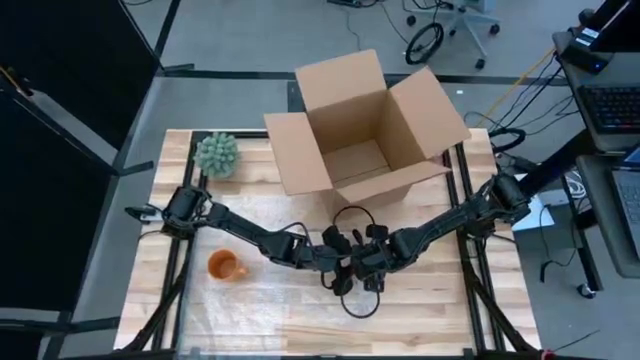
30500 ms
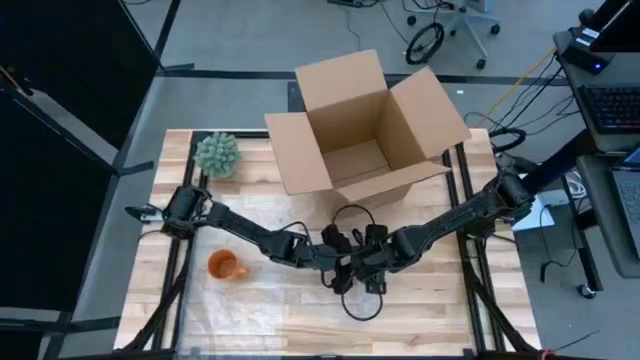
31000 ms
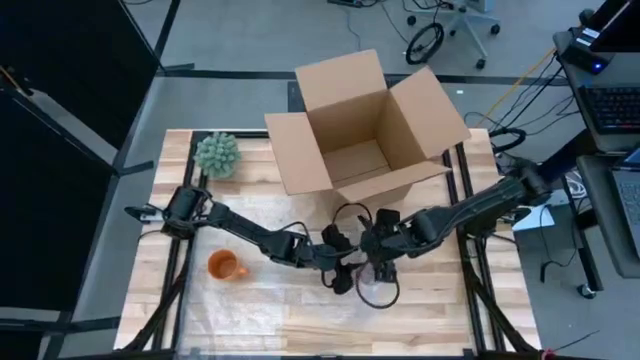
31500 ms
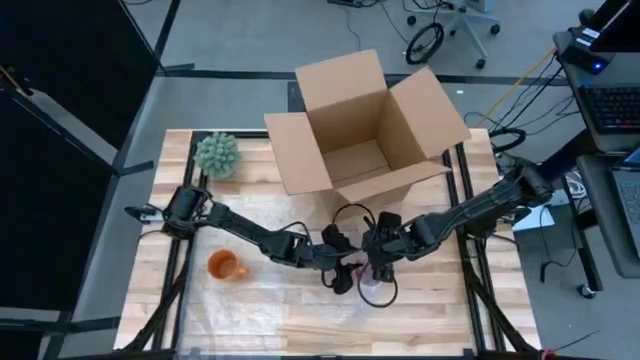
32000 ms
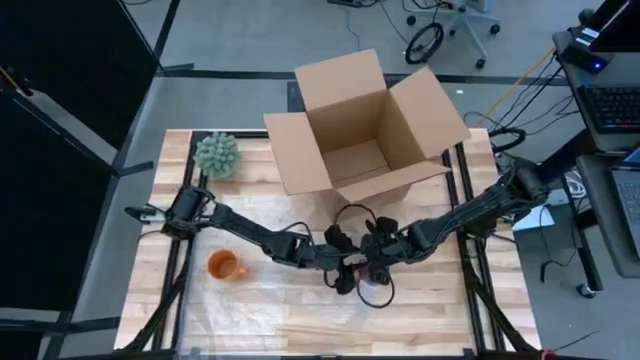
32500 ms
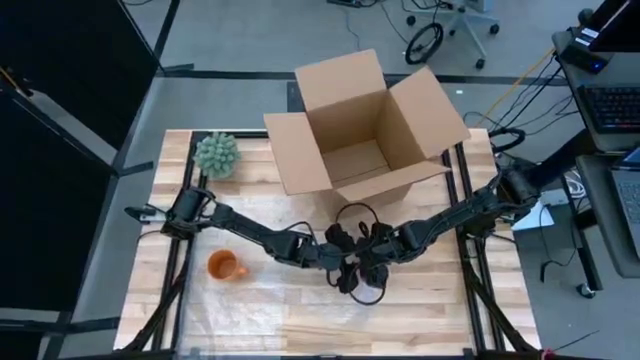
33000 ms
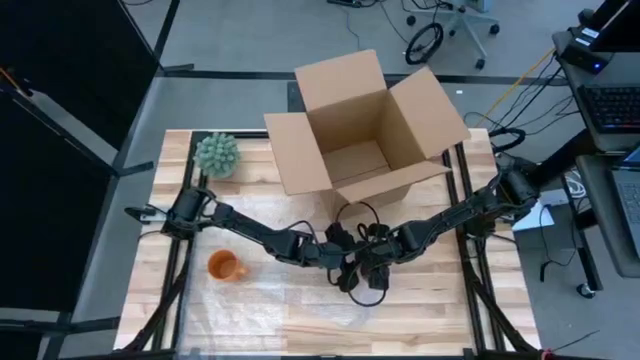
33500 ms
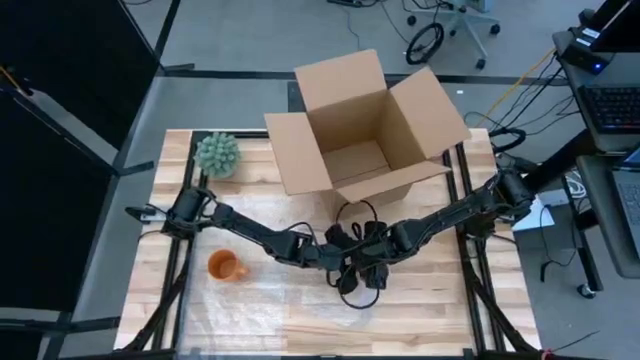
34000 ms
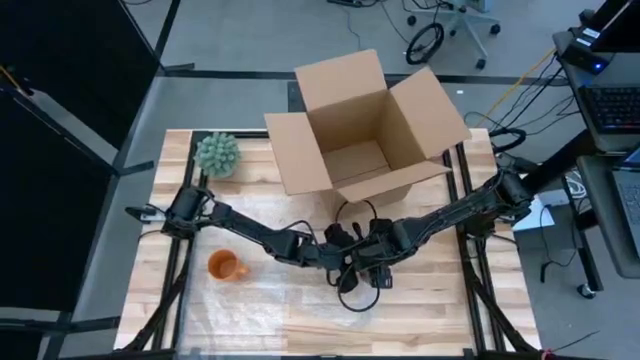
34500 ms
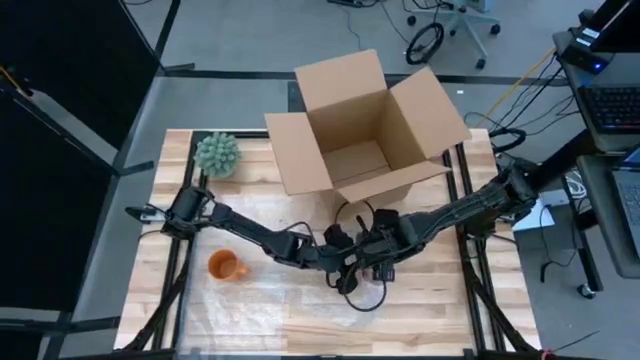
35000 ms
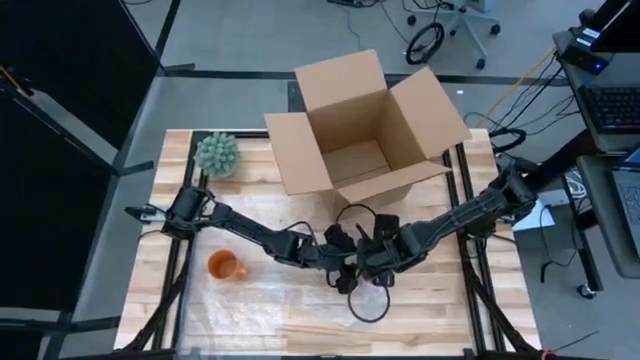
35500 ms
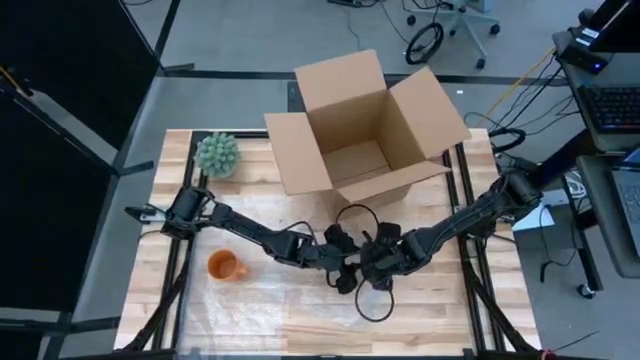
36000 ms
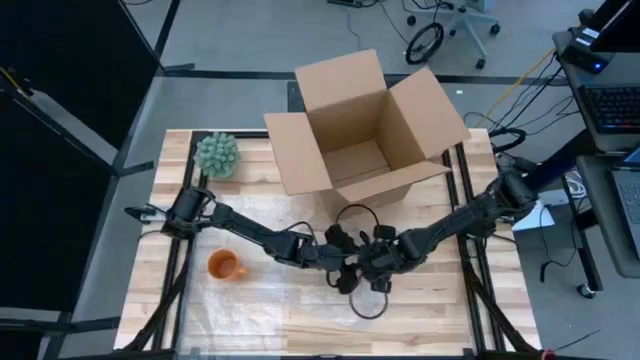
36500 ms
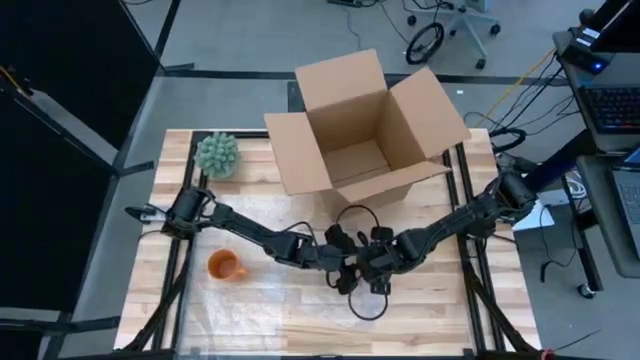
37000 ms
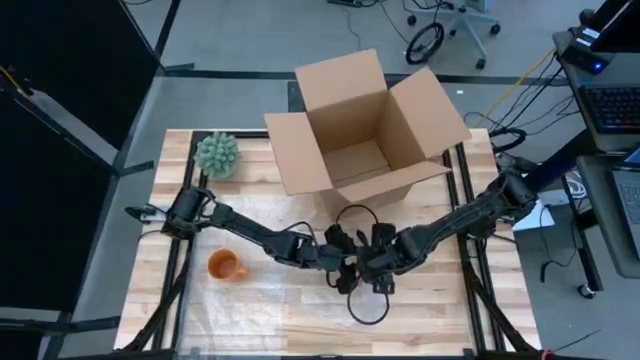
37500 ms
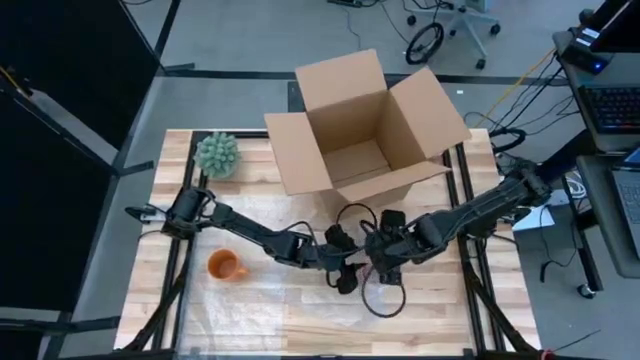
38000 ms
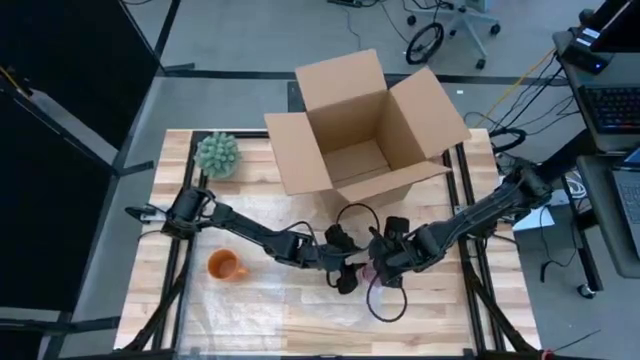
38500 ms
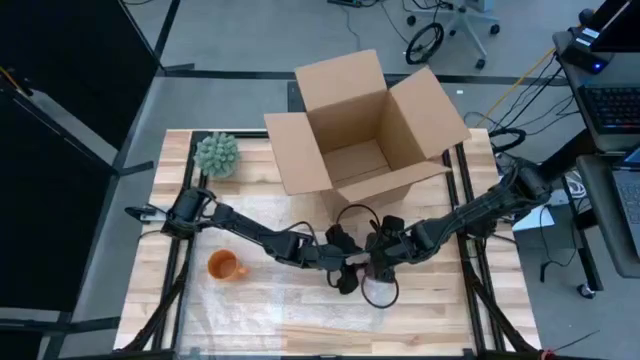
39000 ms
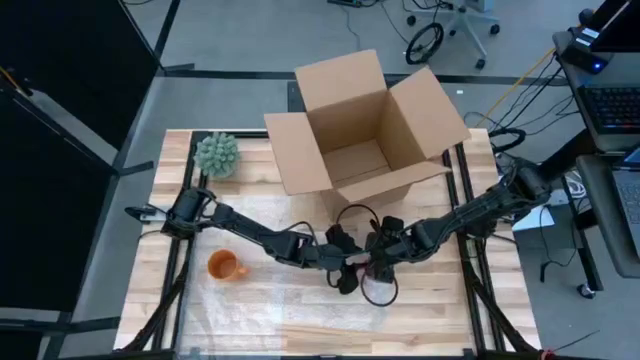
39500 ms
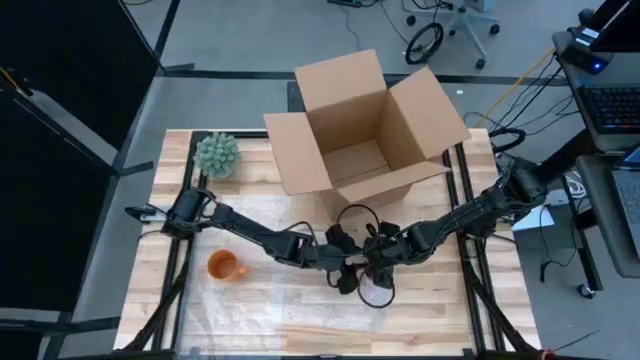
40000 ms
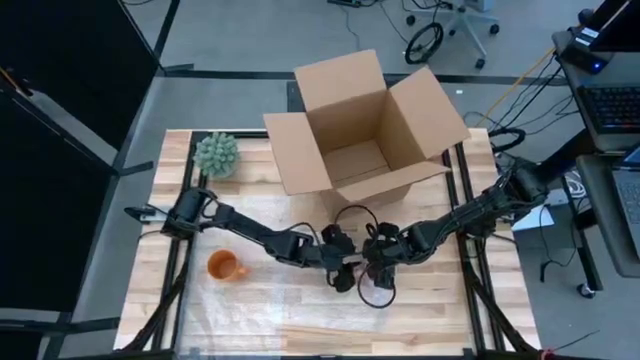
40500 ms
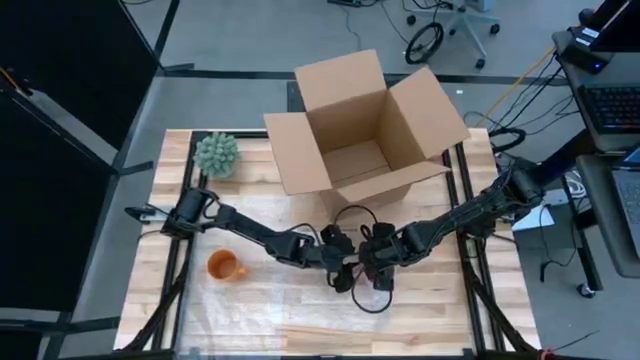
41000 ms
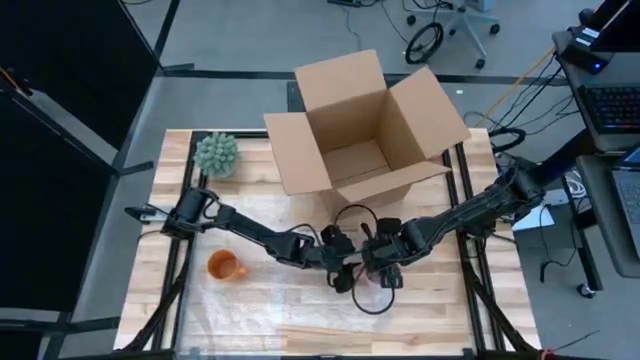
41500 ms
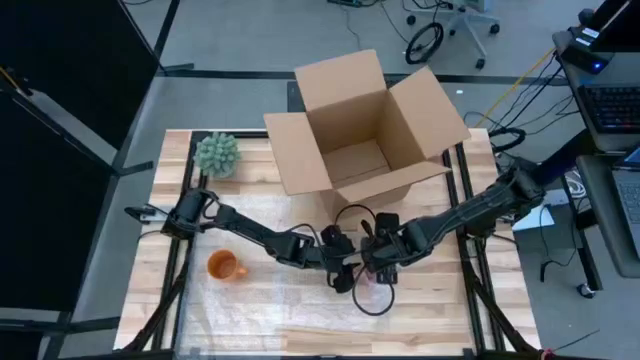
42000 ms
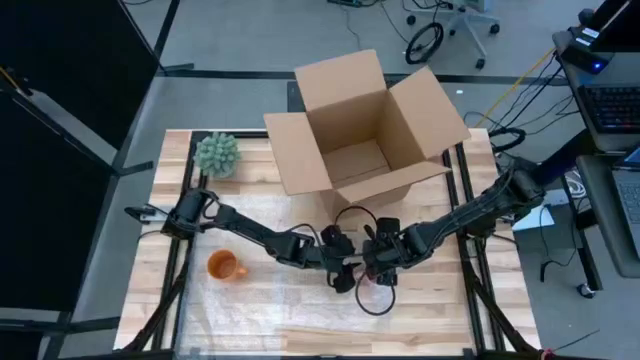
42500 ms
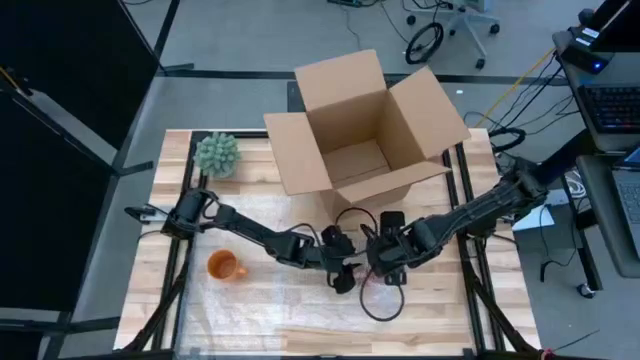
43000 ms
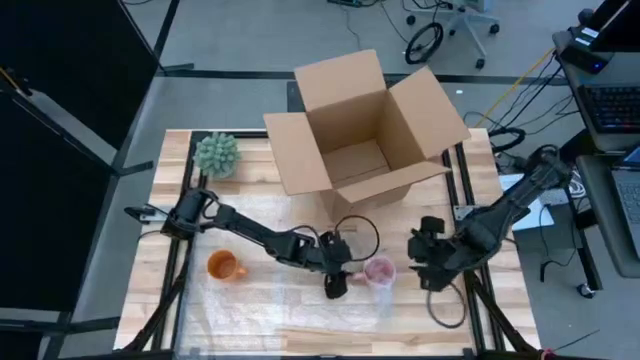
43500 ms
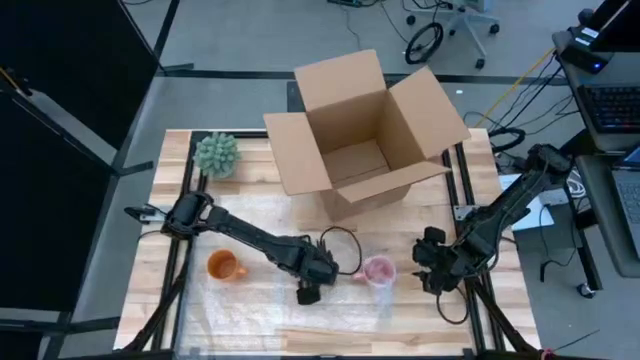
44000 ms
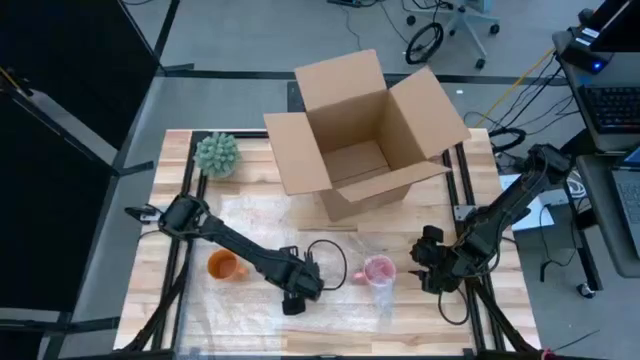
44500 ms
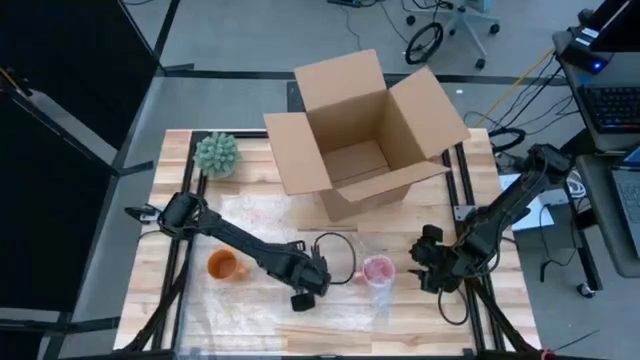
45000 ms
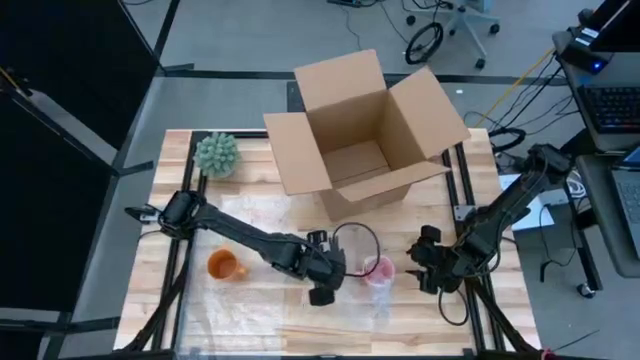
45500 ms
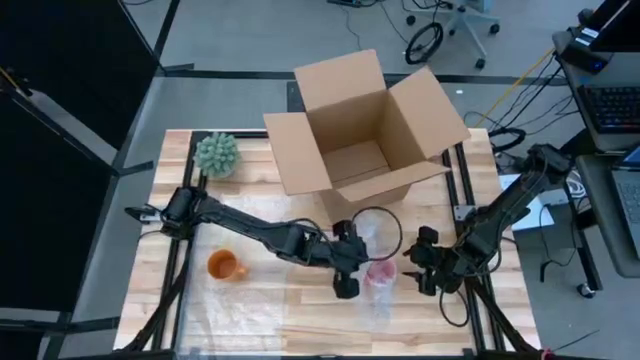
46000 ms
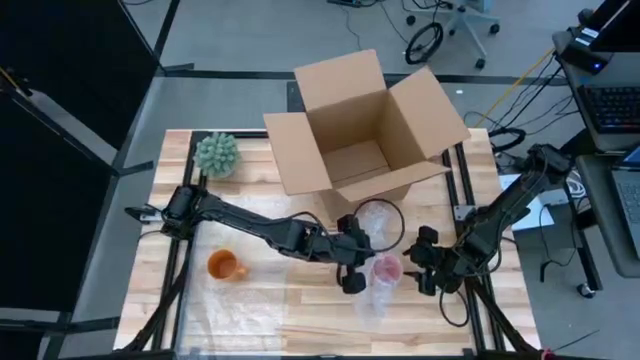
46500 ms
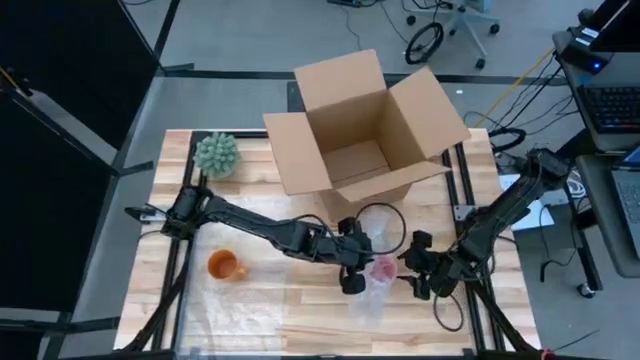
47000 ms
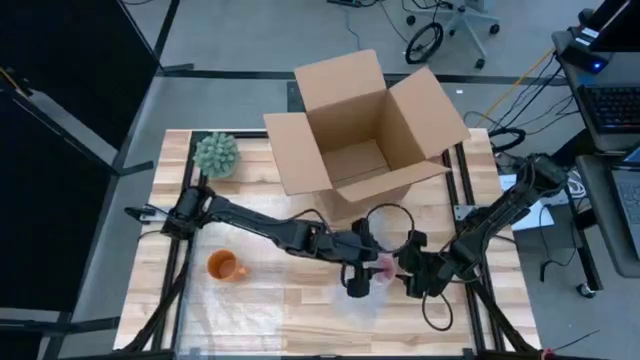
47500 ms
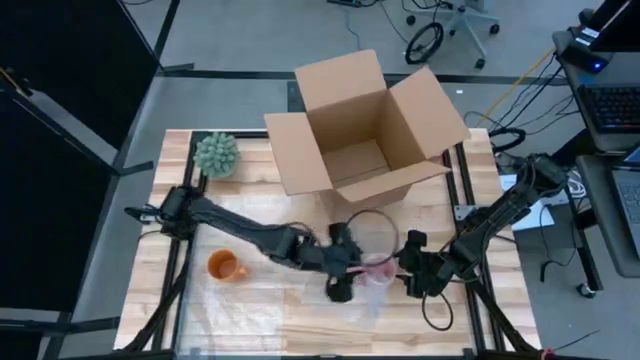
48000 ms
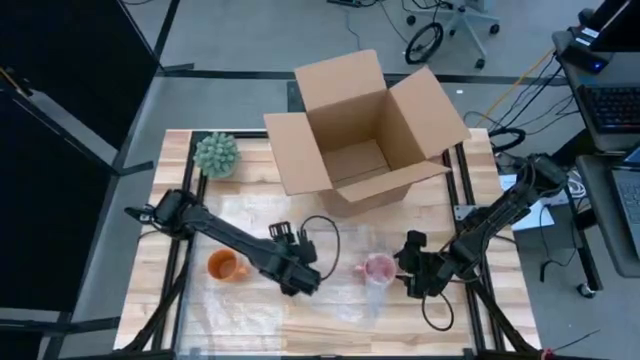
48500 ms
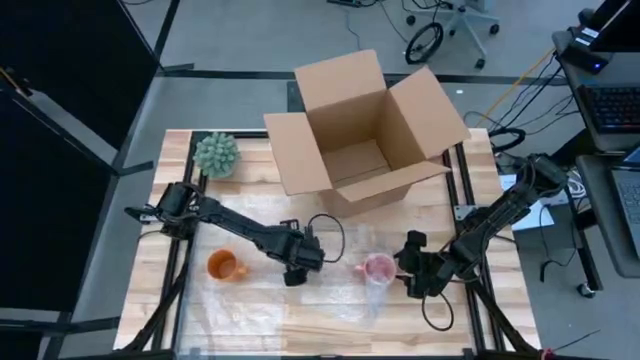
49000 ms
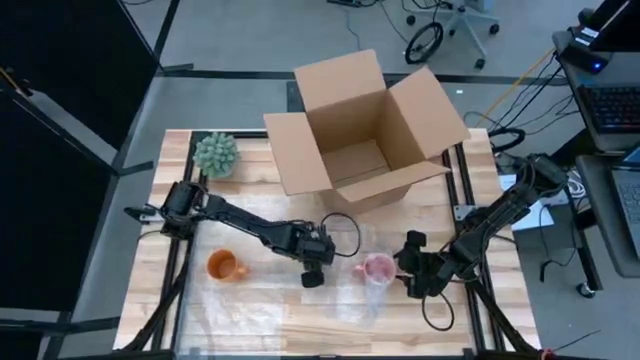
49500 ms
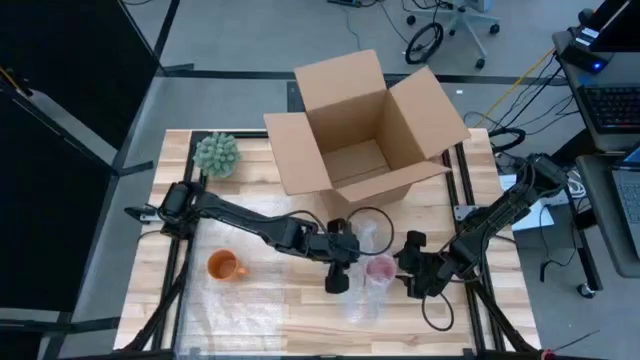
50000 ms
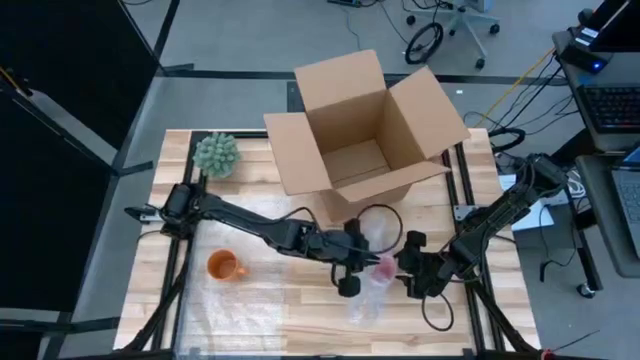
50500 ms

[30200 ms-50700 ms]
Task: wrap mug
Wrap the pink mug with bubble wrap
